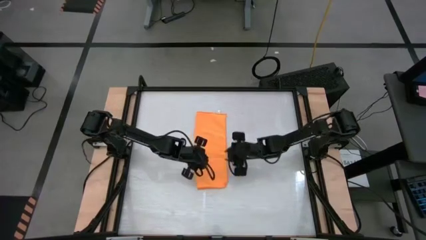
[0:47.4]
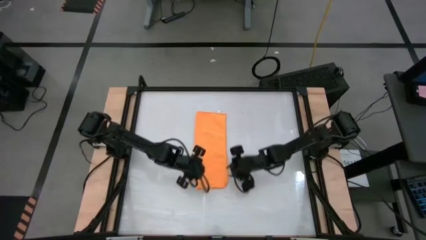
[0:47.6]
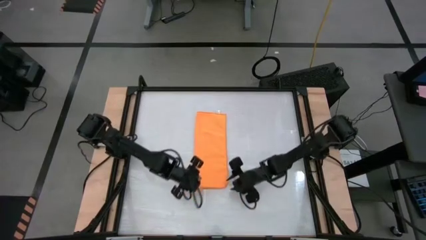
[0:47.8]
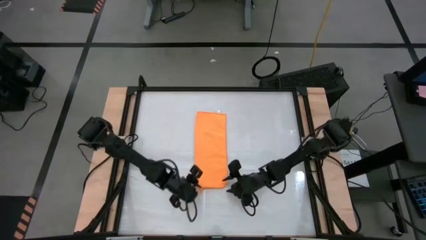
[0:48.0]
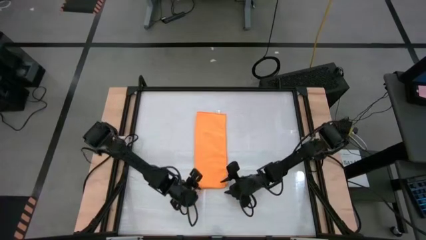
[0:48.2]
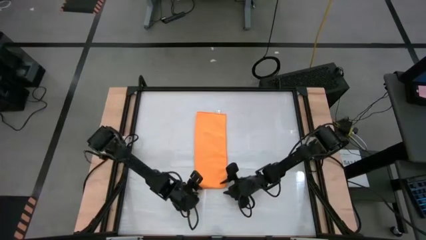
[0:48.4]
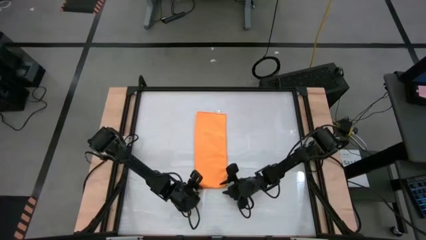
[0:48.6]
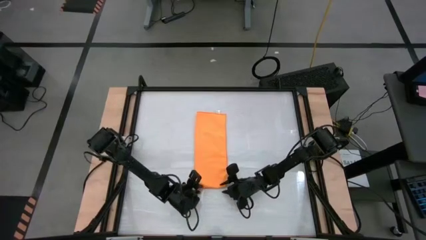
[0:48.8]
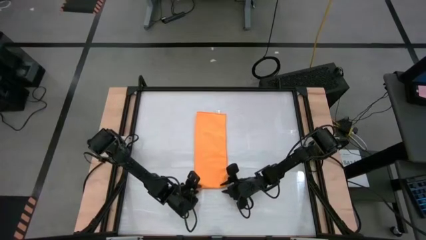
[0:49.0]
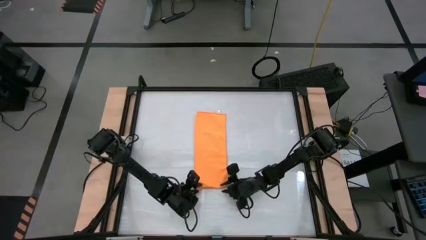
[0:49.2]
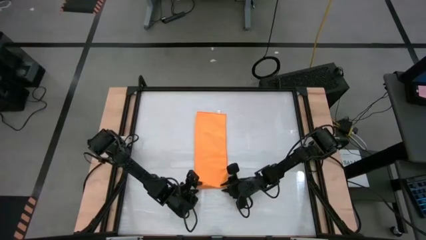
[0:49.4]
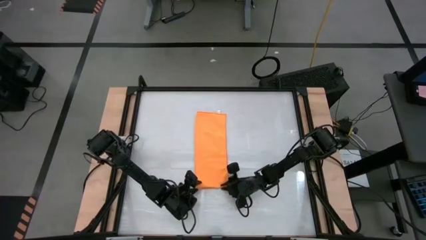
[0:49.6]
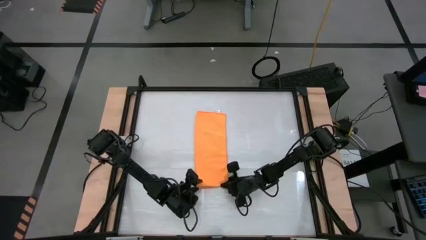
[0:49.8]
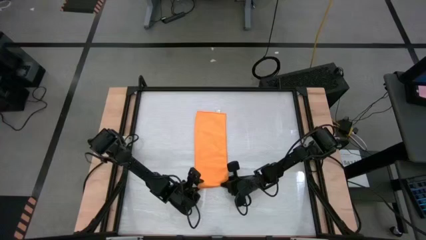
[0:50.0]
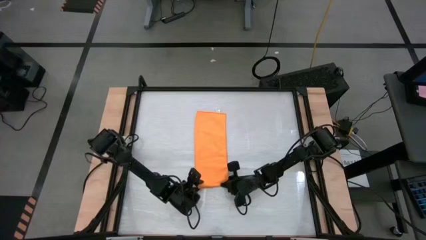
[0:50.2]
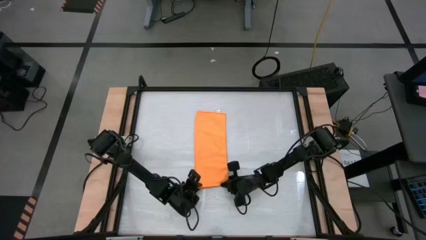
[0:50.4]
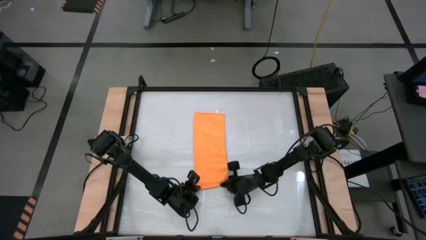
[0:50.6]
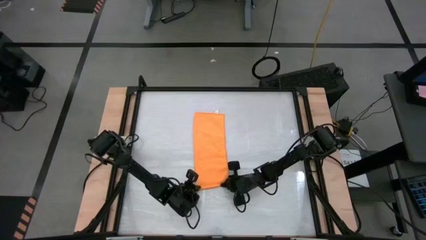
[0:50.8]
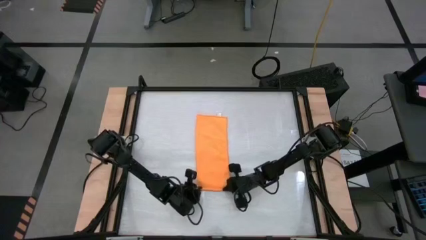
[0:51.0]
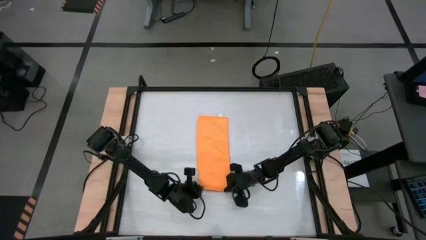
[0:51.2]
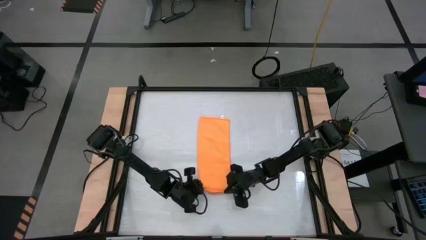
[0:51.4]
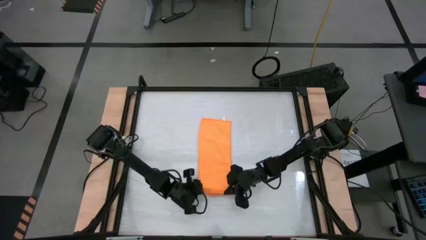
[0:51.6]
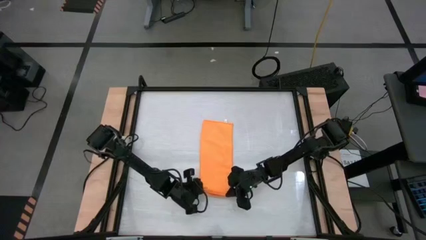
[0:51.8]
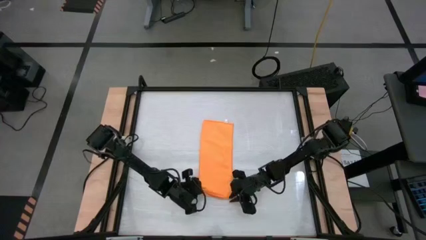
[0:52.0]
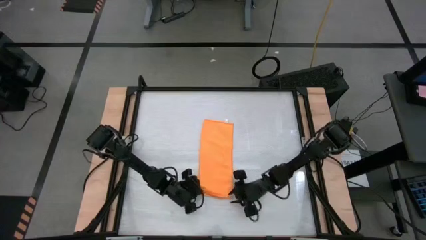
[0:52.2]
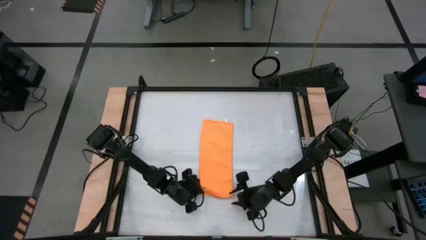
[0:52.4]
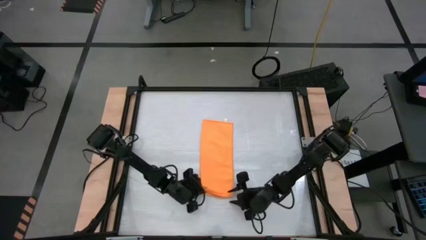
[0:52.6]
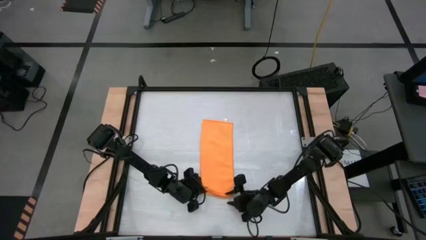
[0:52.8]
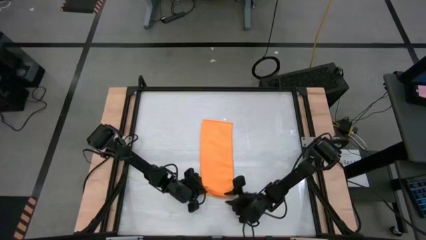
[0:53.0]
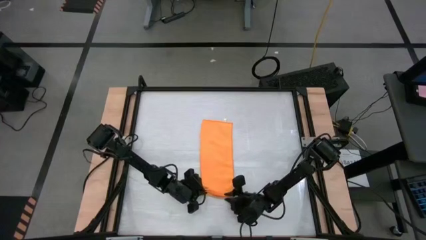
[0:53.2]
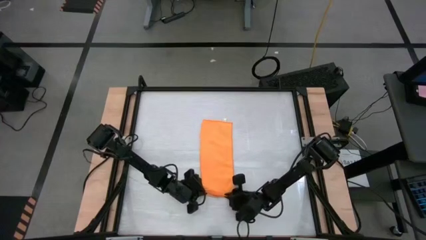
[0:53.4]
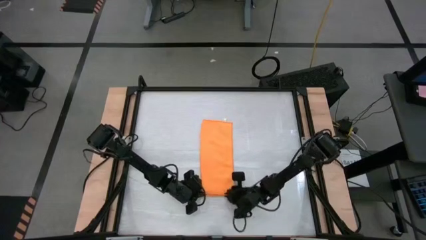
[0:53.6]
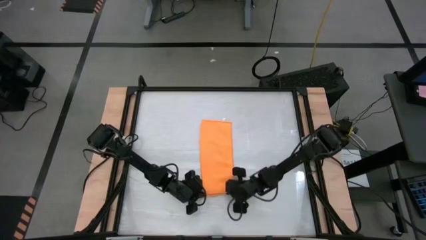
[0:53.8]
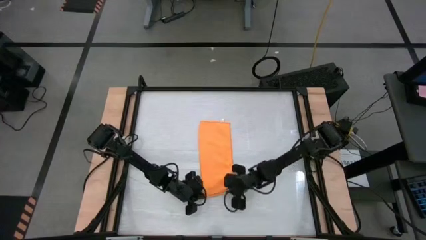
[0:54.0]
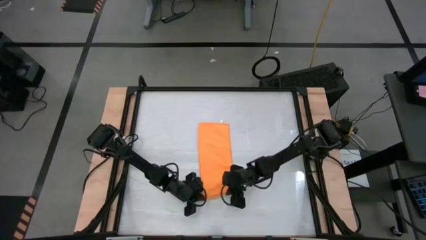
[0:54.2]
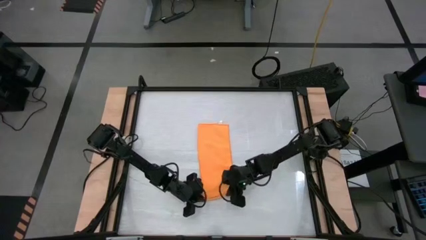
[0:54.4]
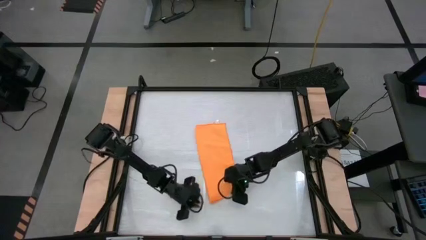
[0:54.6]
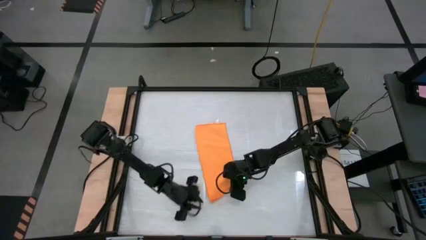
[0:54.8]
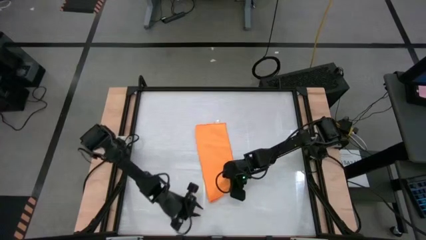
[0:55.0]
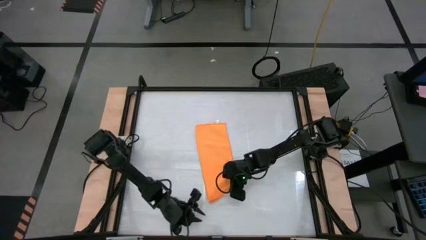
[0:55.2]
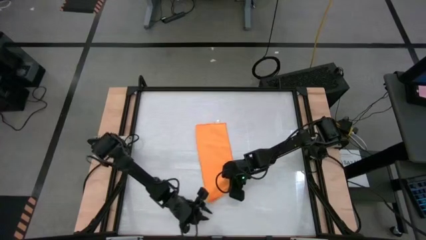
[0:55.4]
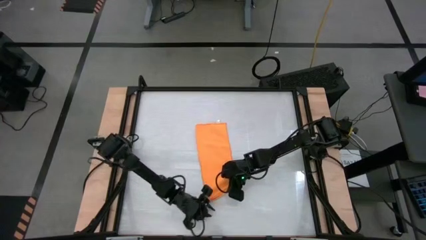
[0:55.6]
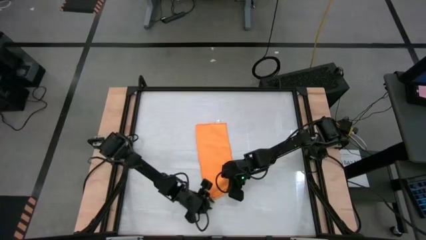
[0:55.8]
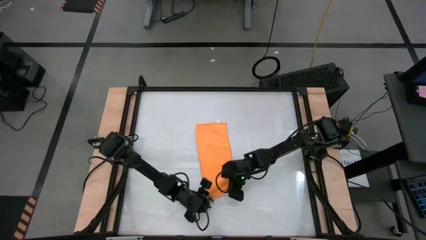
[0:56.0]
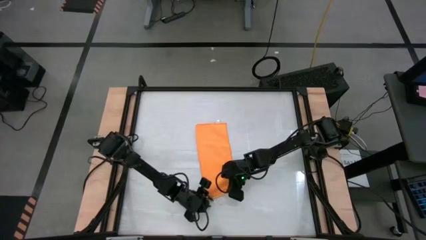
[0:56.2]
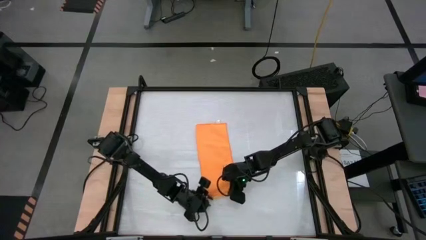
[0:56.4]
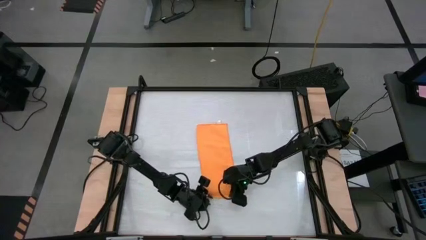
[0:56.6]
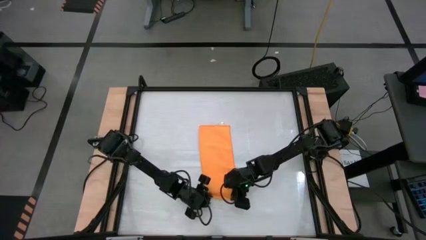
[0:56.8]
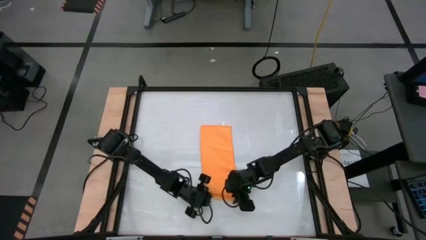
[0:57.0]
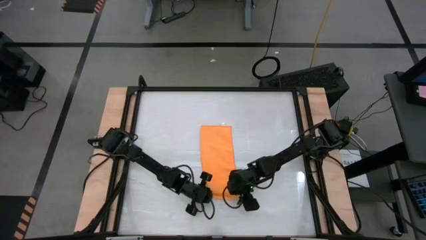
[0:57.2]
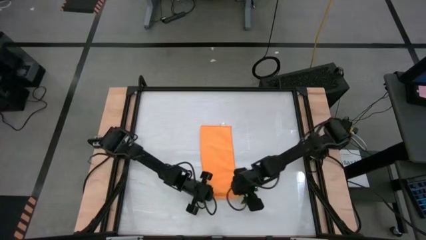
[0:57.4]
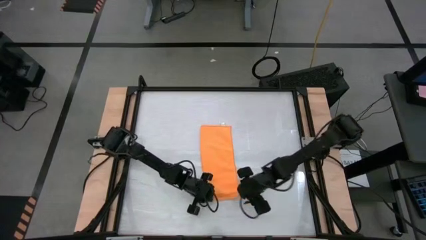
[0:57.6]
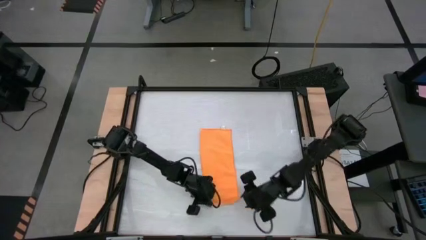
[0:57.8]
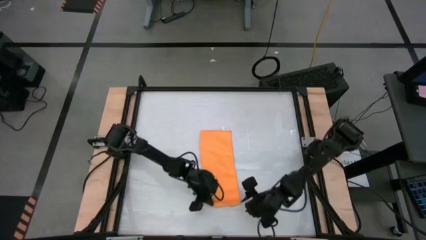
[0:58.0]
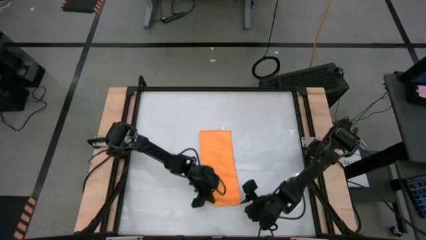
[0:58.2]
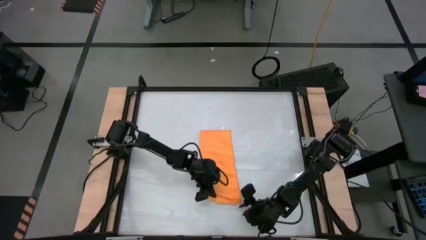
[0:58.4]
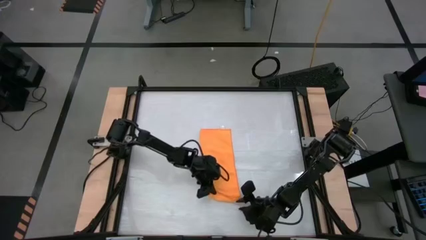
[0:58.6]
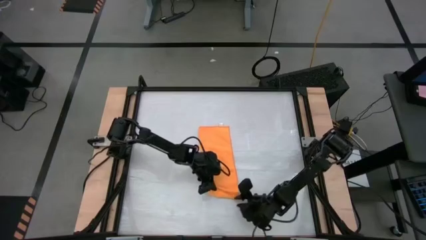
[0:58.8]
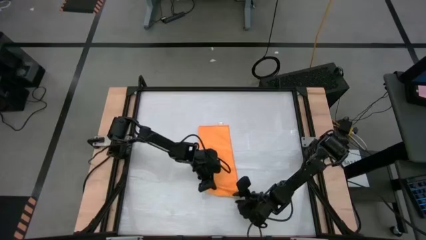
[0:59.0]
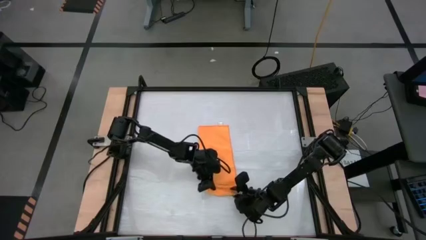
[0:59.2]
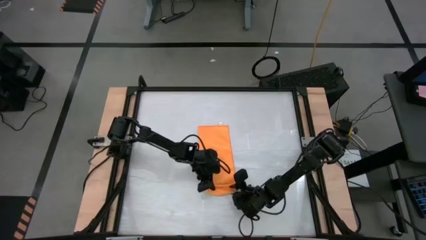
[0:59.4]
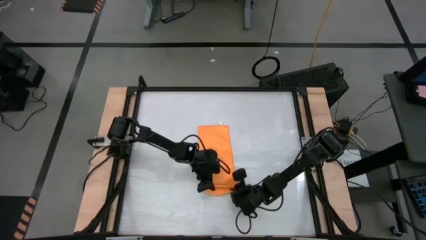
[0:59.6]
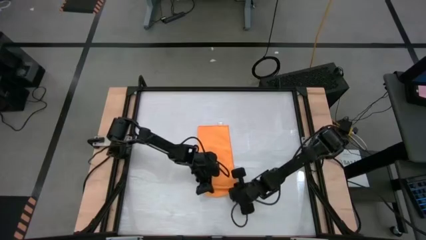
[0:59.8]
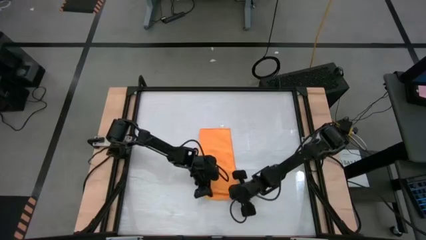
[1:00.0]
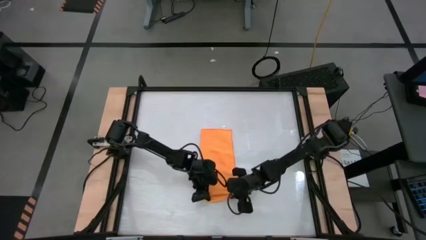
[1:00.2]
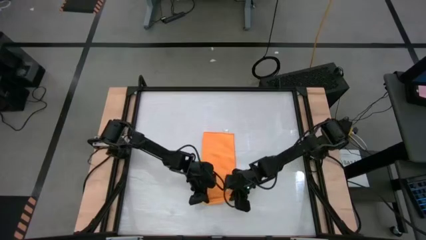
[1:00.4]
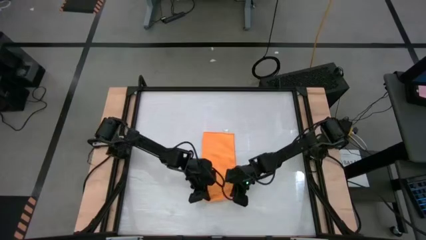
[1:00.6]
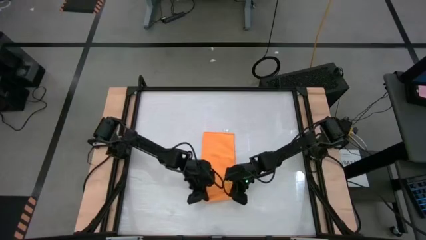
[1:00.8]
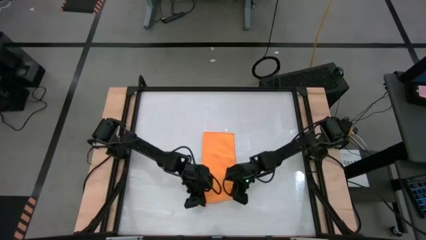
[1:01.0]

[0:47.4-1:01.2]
Task: Roll towel
Roll the orange towel
